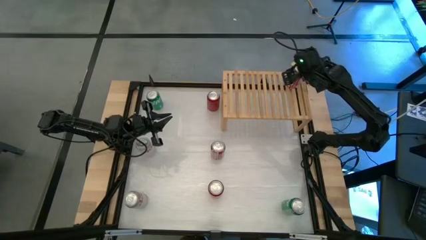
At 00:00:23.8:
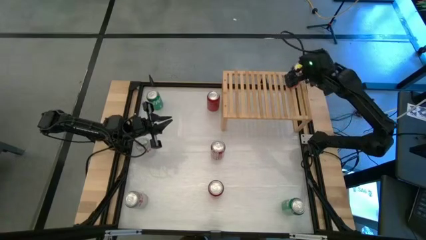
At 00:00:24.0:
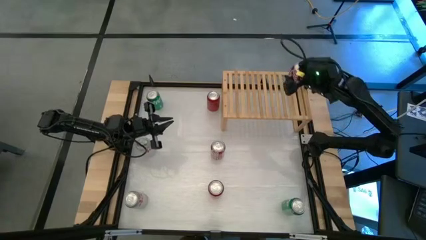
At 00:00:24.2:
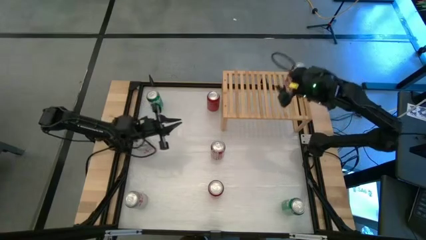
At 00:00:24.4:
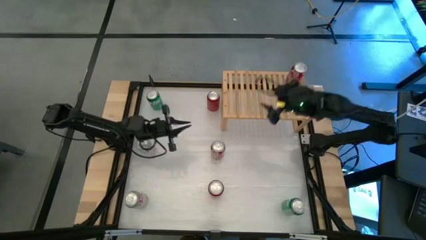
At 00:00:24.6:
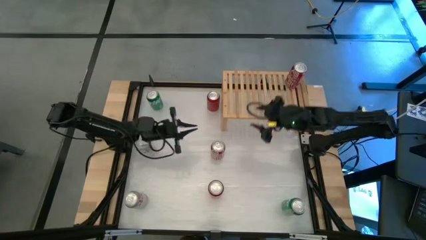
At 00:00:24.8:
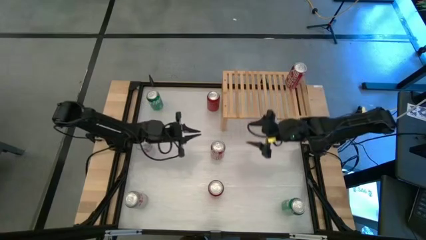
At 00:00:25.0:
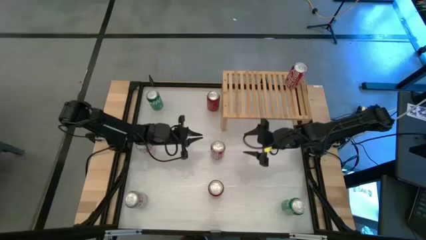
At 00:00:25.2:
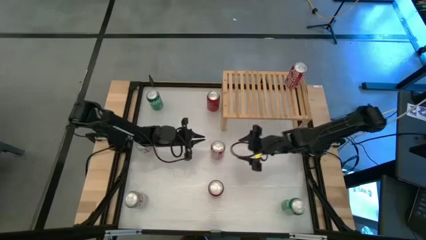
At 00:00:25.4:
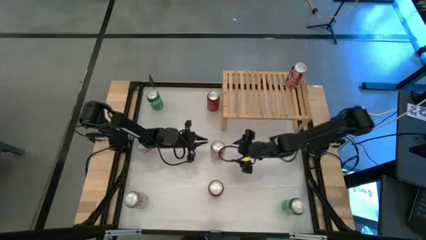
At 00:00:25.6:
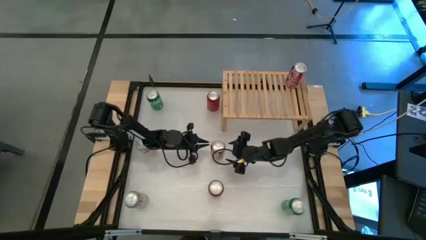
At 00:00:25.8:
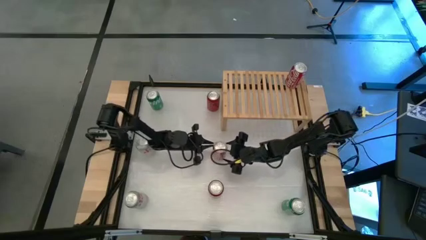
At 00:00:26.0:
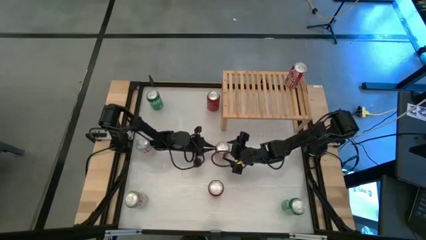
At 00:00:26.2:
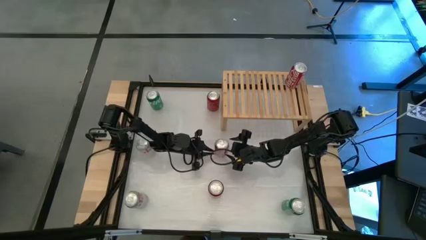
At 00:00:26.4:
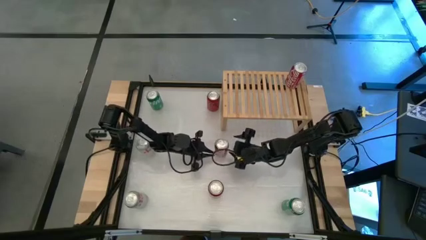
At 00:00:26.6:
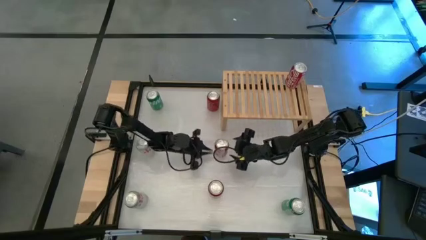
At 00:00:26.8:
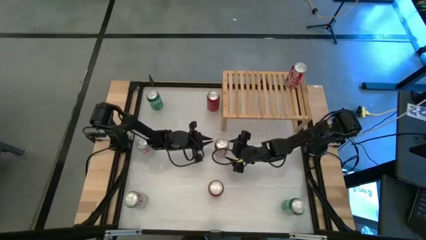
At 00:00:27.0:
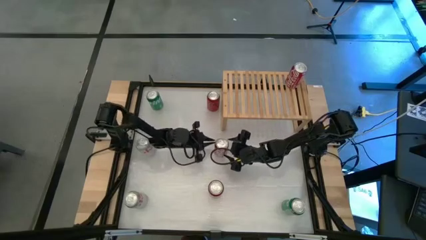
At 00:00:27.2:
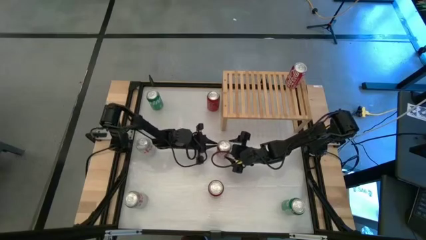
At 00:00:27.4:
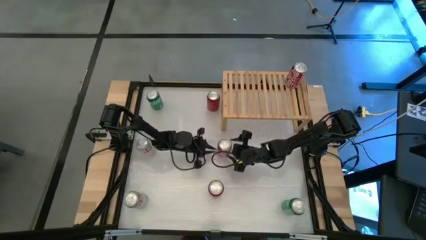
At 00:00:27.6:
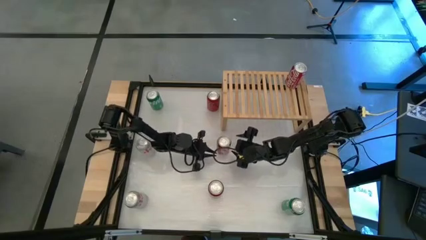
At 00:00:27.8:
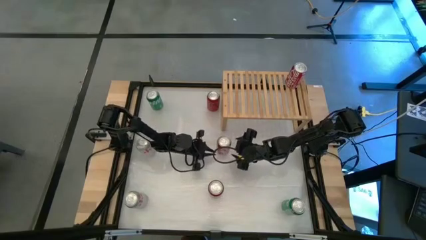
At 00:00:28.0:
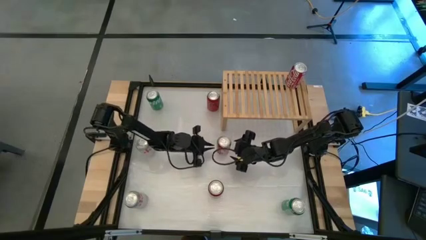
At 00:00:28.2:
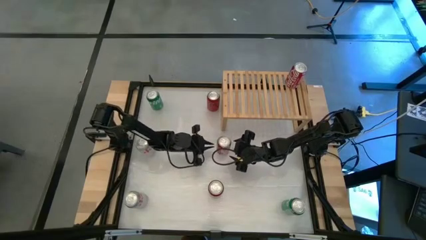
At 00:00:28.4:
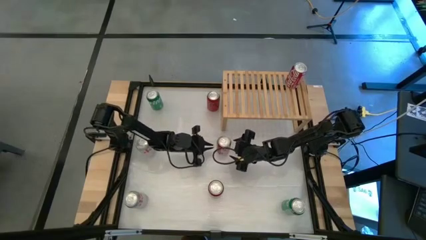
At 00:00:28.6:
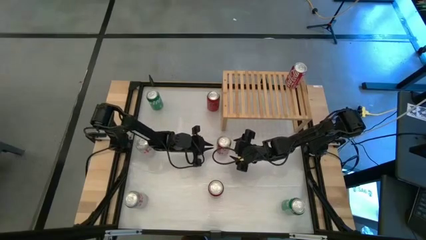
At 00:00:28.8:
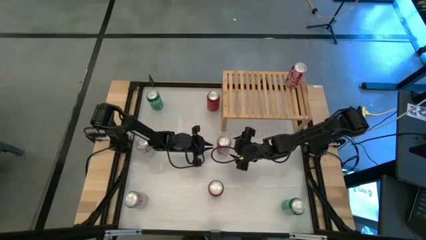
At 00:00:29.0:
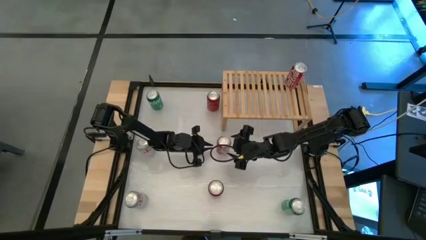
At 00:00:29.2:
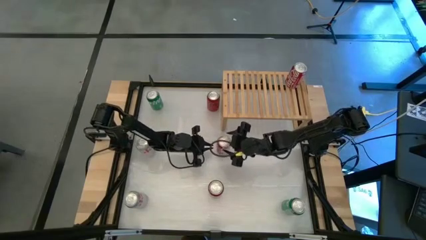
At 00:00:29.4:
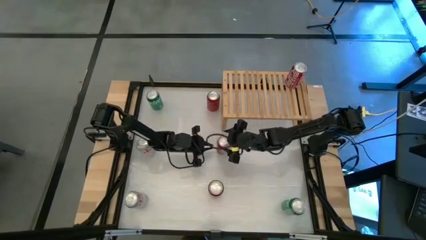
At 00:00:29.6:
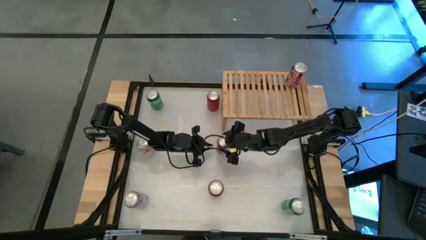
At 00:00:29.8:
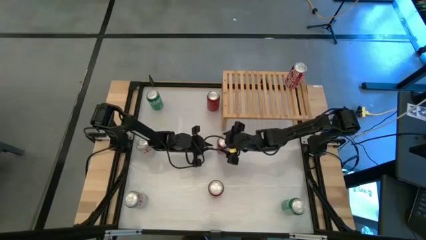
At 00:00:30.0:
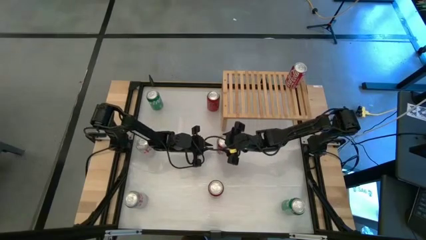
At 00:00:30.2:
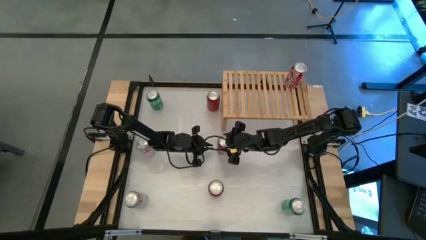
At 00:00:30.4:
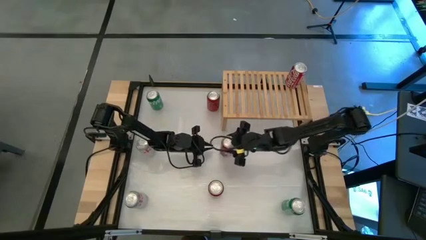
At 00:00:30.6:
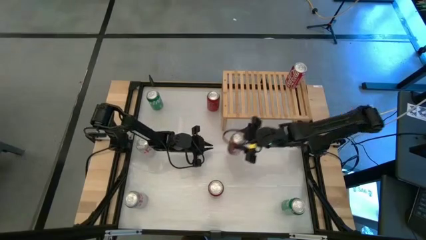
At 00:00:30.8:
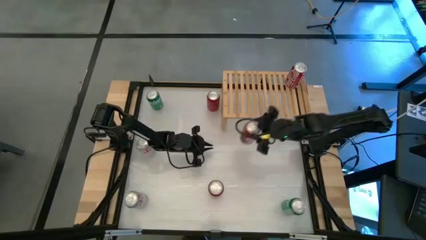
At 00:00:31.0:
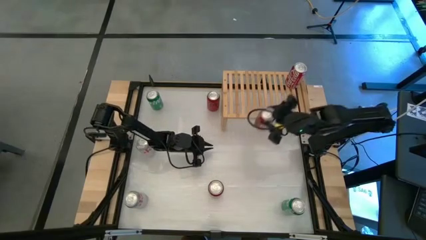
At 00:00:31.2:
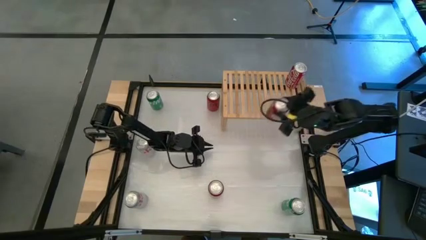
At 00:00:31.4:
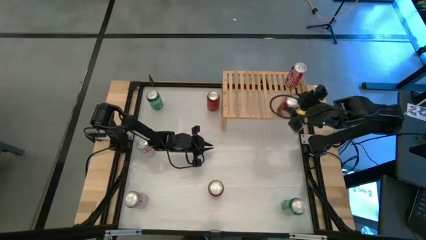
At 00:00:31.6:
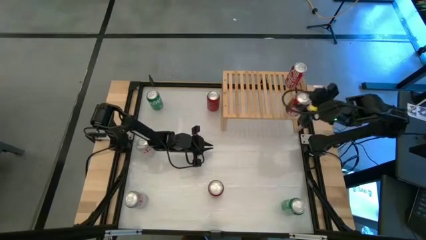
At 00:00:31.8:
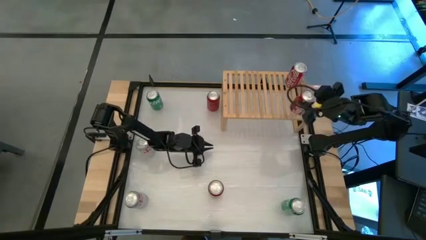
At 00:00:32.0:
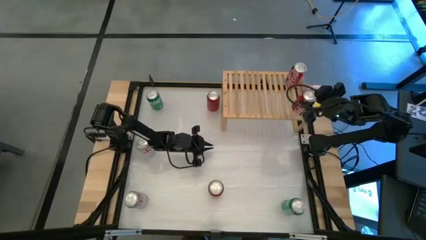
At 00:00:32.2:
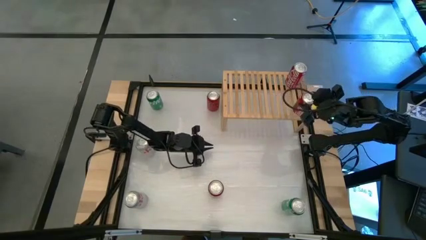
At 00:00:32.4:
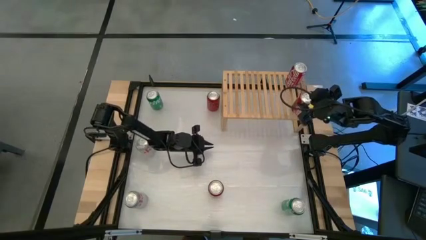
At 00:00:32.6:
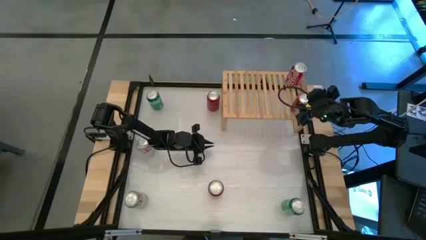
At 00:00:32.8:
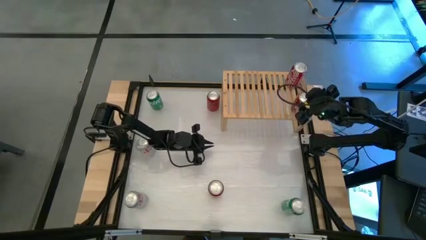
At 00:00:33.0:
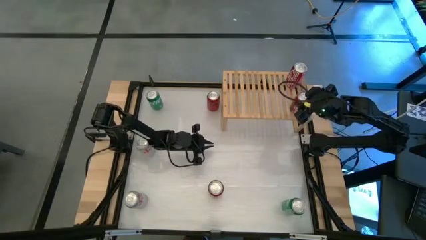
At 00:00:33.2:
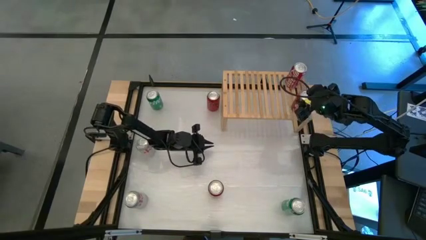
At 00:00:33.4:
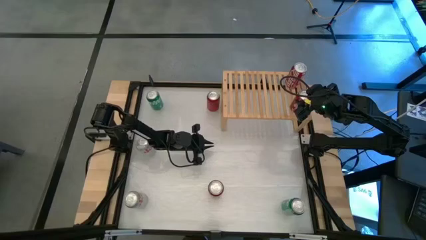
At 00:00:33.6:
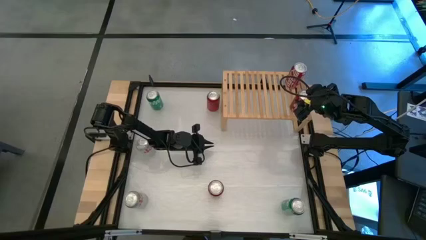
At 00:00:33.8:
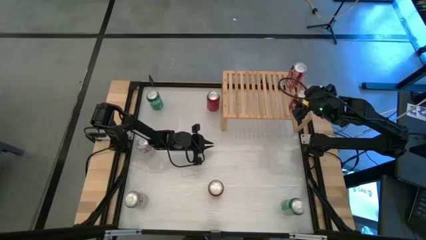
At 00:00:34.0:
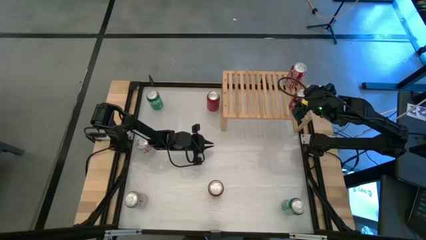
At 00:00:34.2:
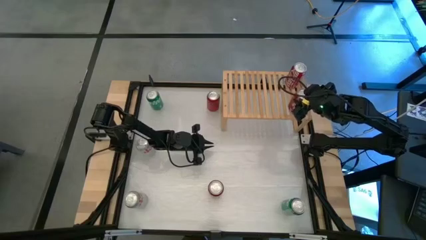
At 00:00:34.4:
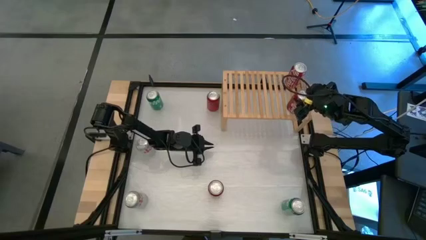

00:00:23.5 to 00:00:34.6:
Task: Place canned beverage on shelf
Put the red white soda can on the shelf aligned with the other red white soda can
